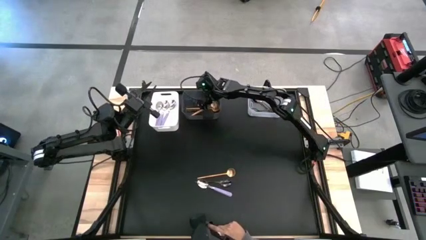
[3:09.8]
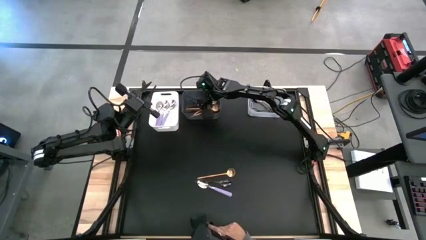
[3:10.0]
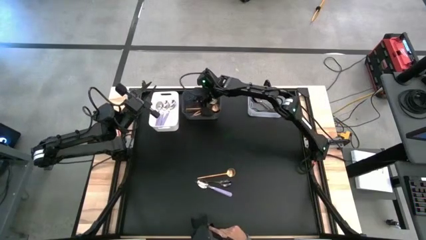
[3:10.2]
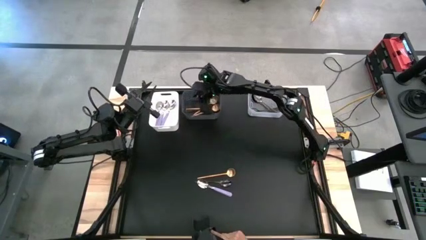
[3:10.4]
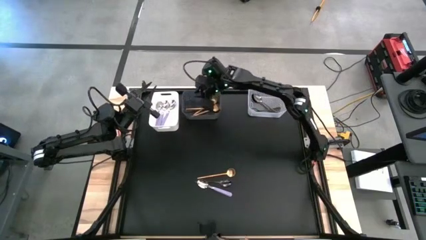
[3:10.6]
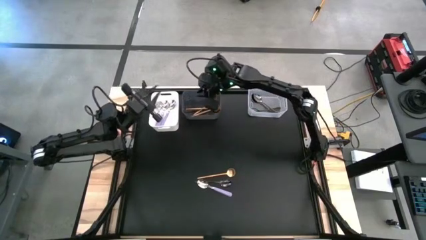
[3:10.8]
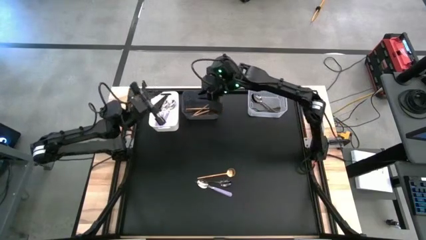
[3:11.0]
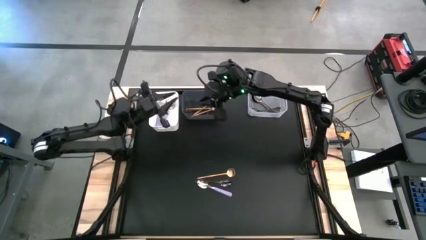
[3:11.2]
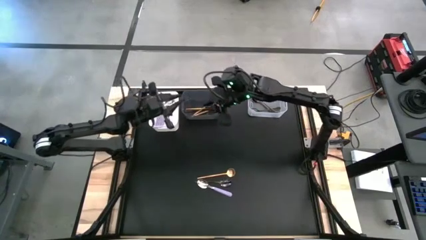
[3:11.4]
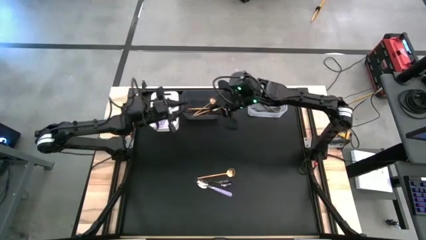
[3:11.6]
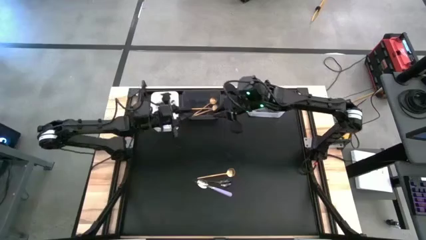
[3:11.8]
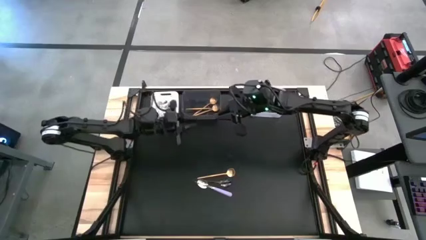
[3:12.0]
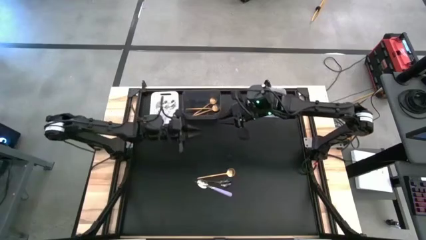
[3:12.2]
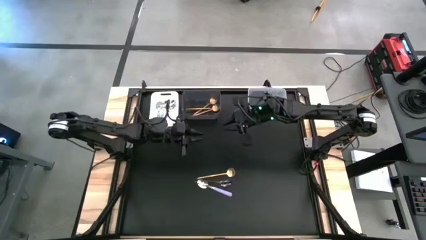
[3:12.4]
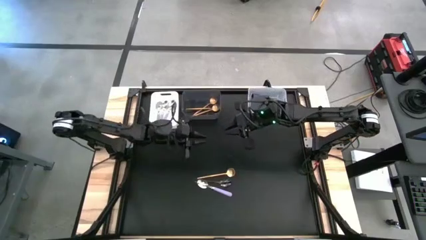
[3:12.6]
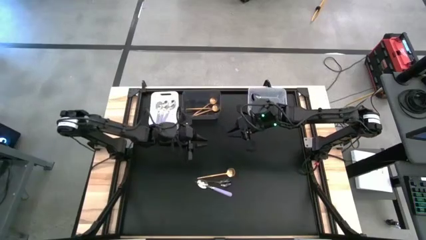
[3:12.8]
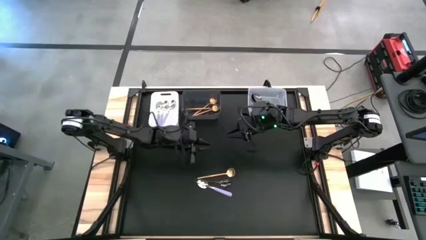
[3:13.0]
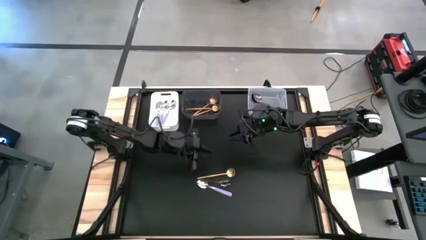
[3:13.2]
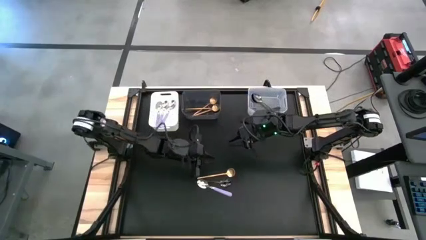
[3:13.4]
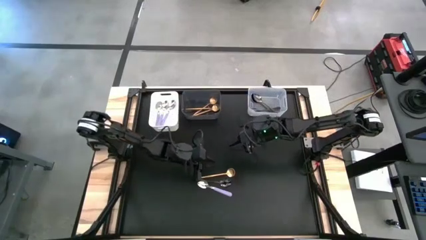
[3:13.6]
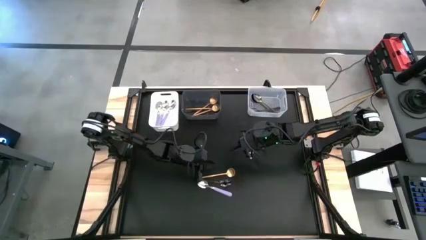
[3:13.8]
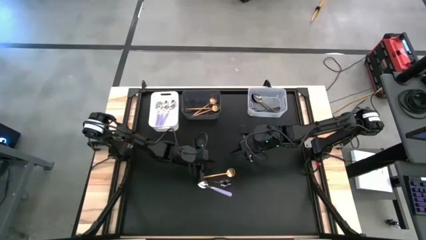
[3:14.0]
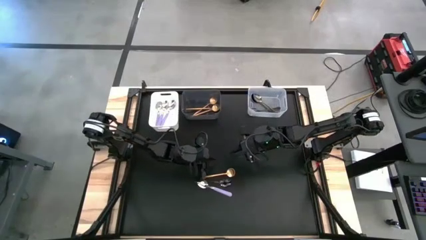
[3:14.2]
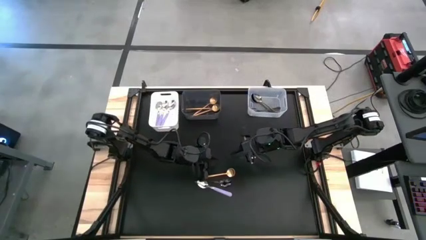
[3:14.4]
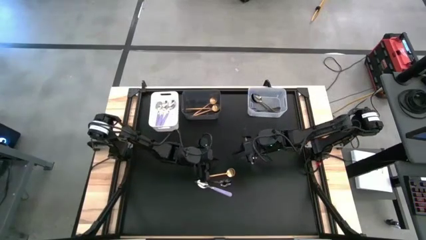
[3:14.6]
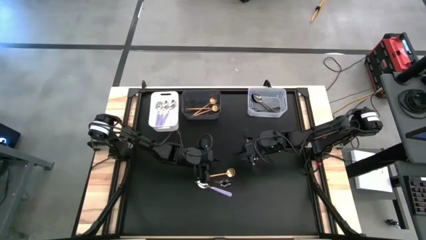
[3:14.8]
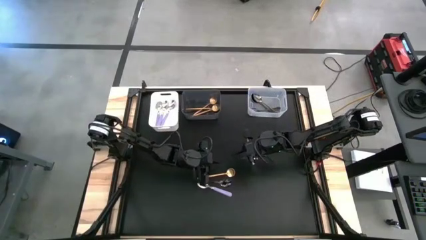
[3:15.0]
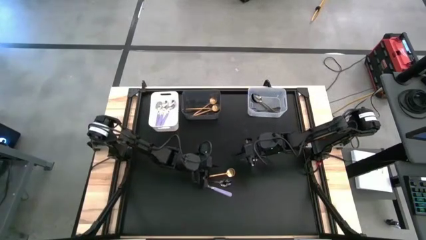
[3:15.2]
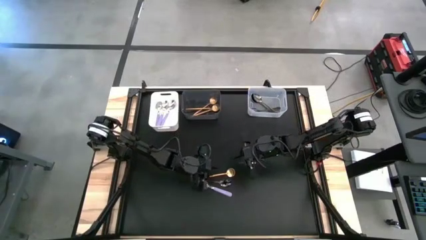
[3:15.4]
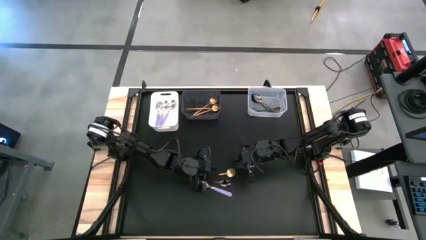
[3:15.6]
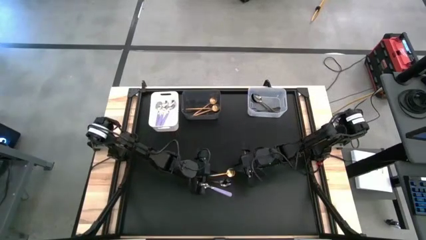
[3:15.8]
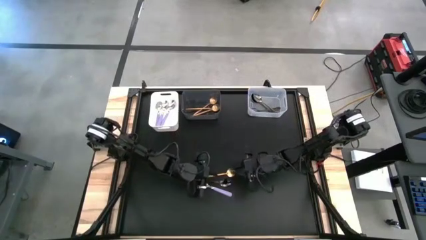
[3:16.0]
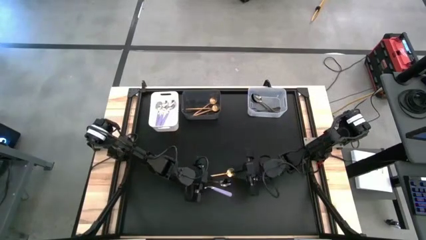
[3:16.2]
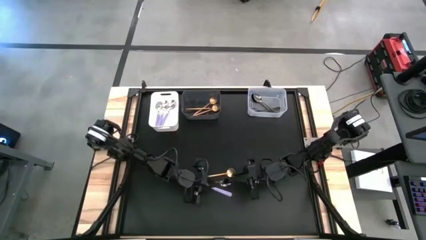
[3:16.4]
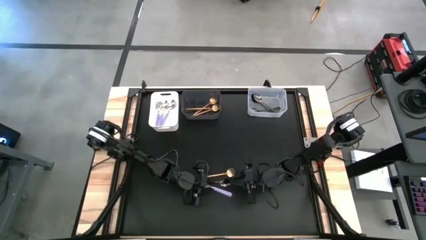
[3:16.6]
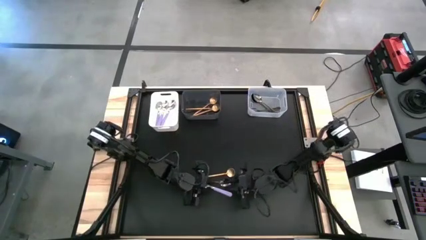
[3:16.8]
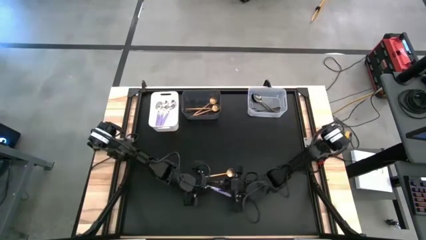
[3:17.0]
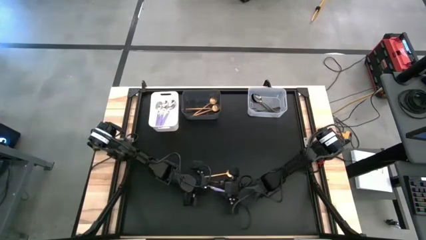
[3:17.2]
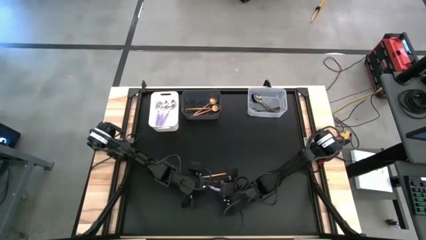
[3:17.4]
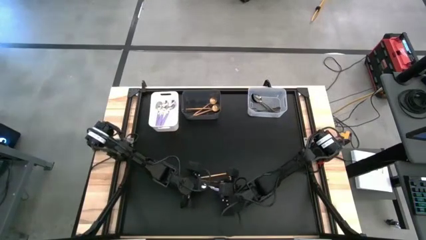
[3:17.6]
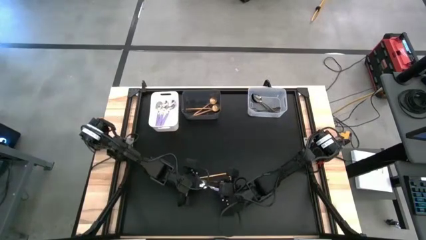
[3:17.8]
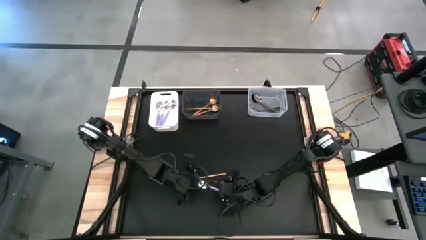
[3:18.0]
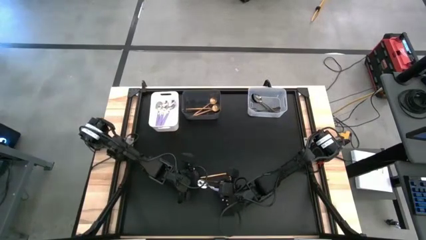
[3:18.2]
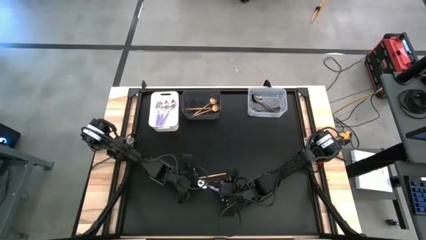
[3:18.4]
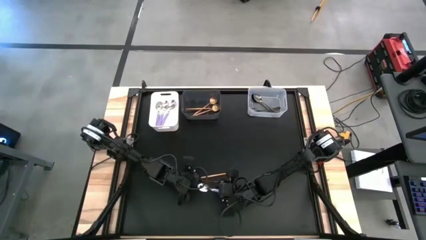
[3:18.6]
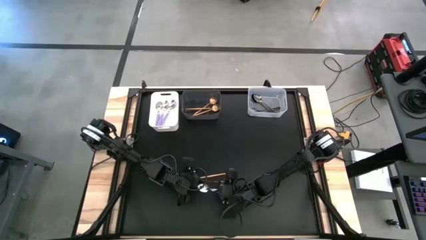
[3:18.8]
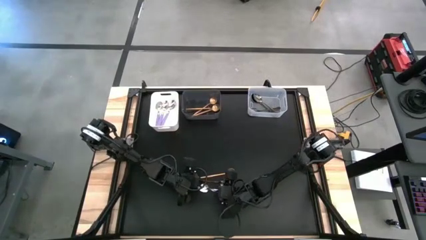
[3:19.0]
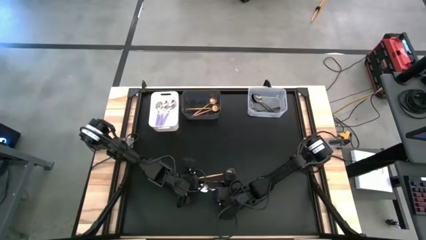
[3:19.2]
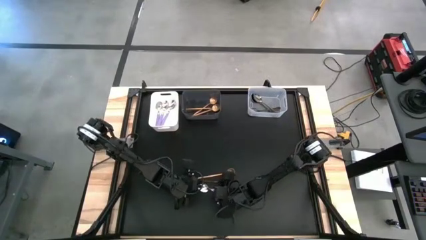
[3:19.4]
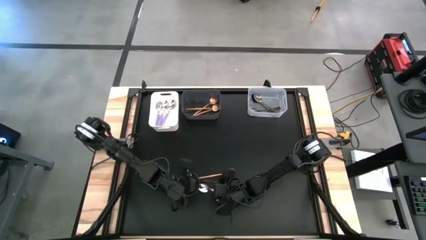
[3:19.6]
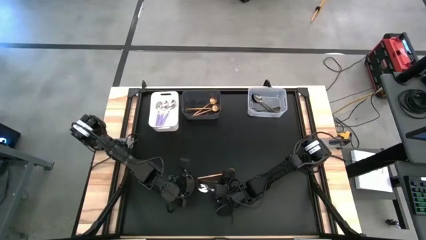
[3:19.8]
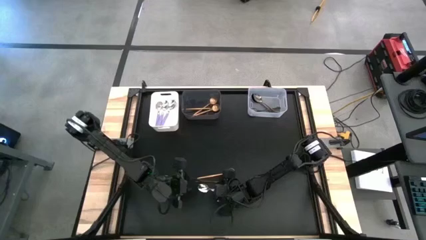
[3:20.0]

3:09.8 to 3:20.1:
Task: Sort silverware by color (type)
Put the purple spoon into the white bin
